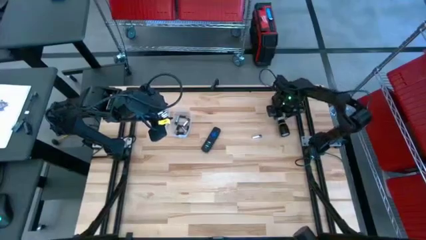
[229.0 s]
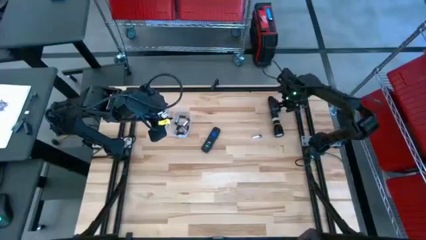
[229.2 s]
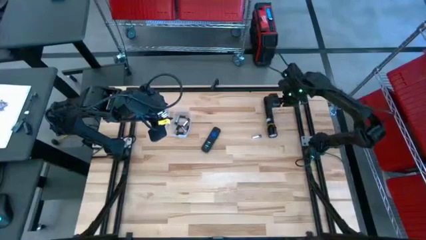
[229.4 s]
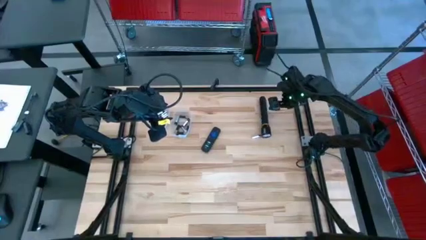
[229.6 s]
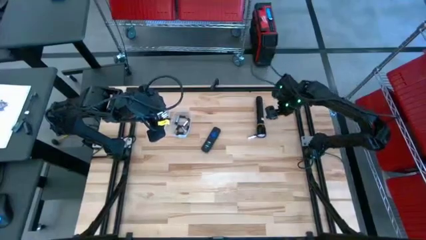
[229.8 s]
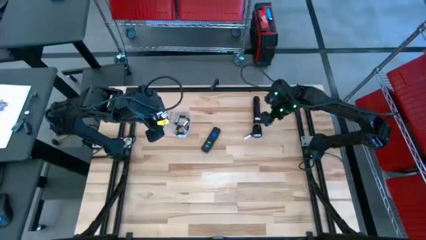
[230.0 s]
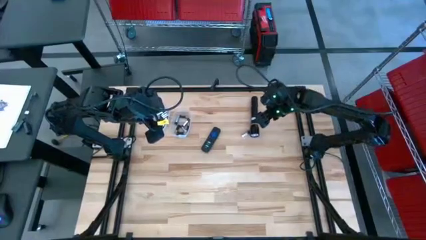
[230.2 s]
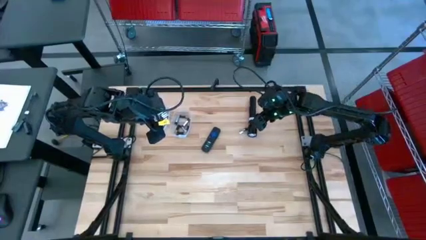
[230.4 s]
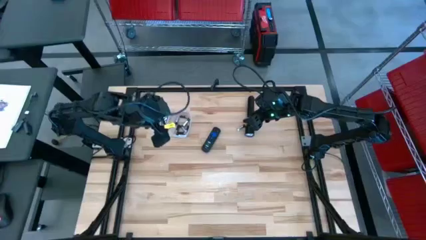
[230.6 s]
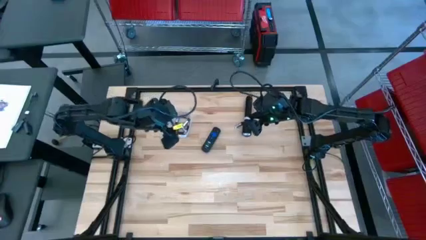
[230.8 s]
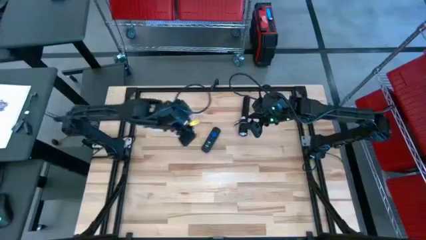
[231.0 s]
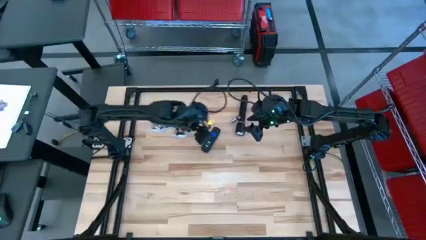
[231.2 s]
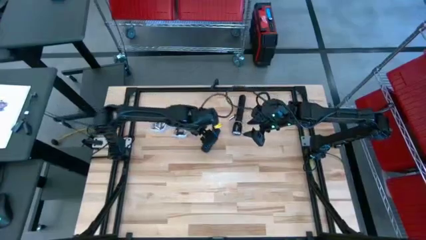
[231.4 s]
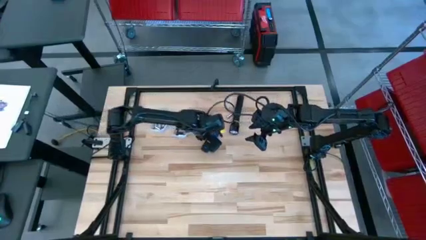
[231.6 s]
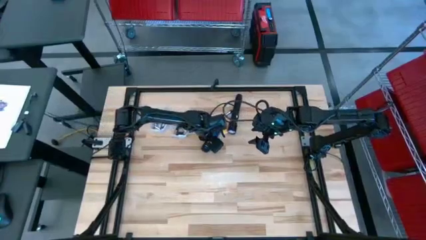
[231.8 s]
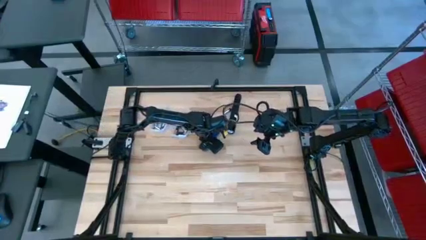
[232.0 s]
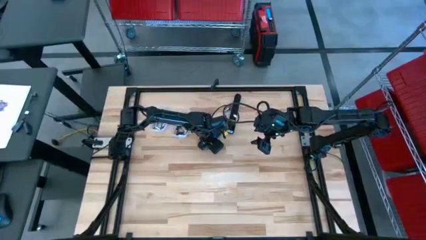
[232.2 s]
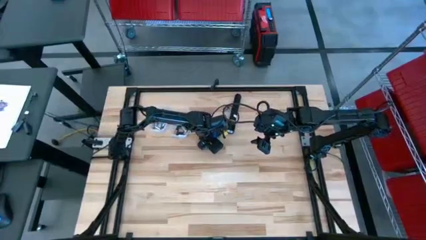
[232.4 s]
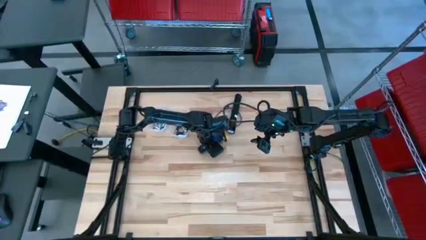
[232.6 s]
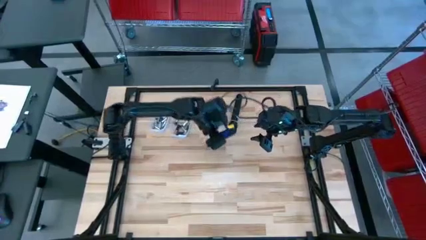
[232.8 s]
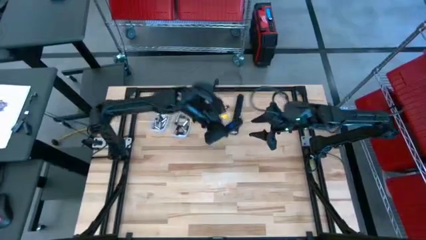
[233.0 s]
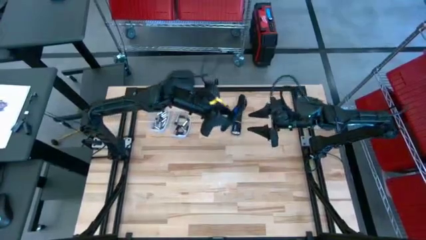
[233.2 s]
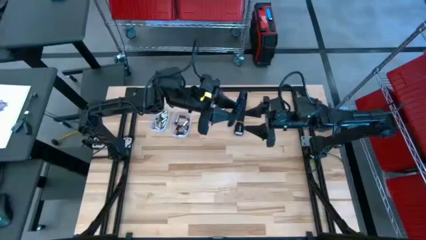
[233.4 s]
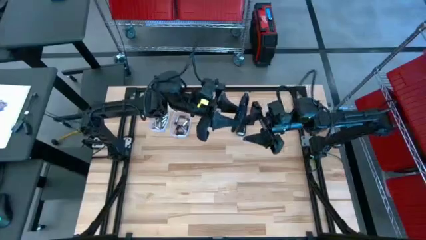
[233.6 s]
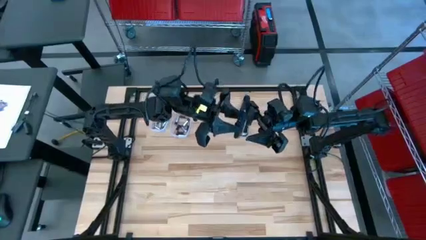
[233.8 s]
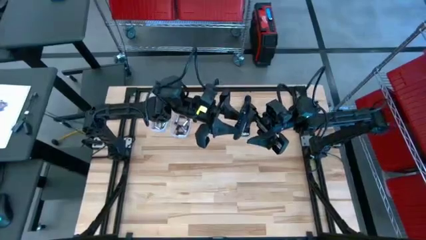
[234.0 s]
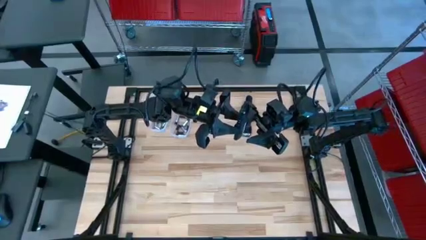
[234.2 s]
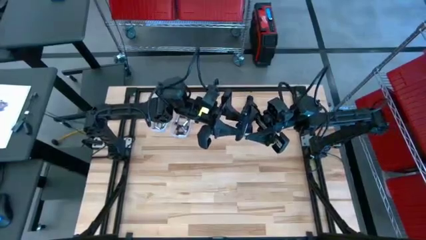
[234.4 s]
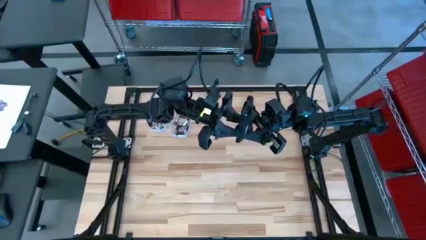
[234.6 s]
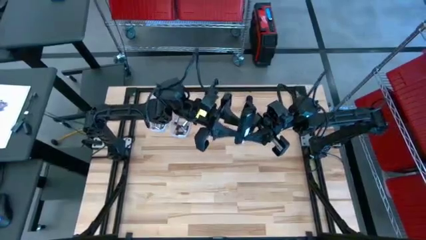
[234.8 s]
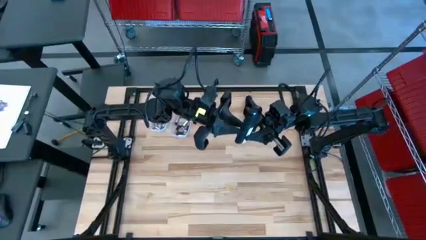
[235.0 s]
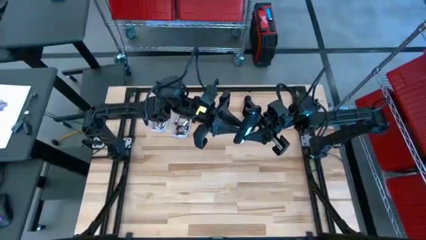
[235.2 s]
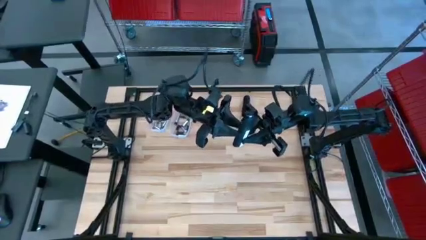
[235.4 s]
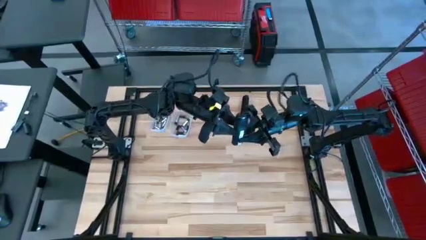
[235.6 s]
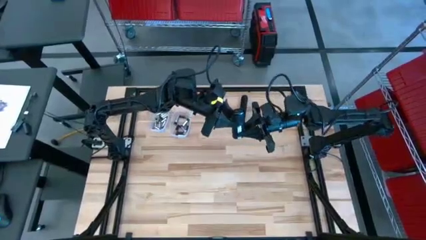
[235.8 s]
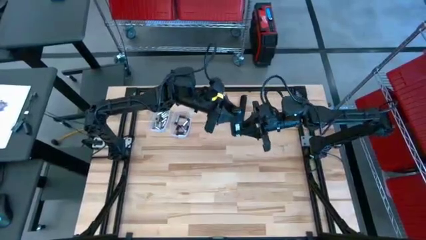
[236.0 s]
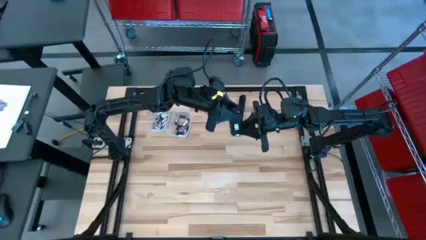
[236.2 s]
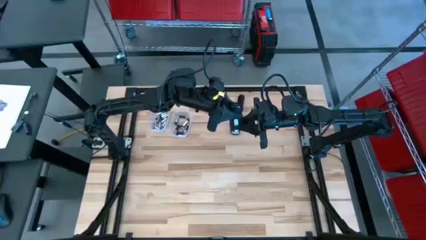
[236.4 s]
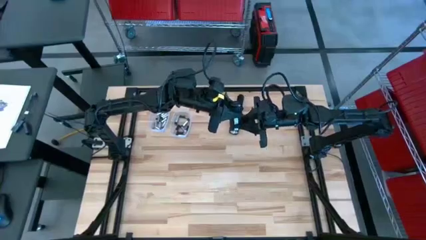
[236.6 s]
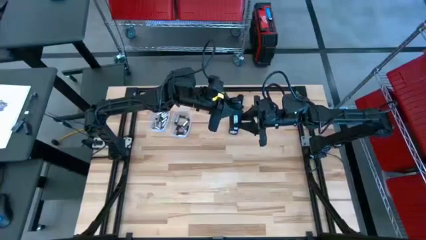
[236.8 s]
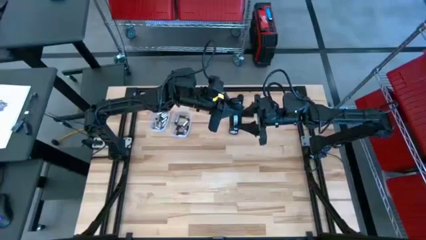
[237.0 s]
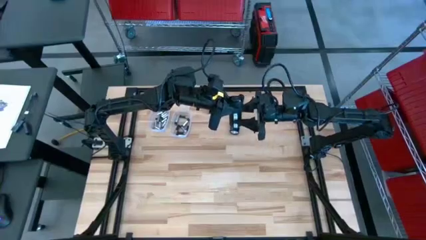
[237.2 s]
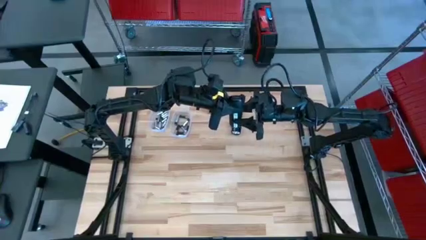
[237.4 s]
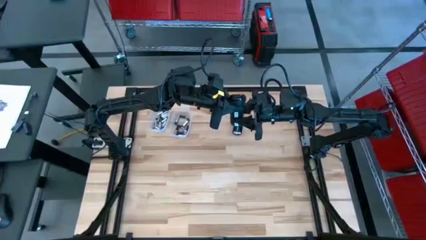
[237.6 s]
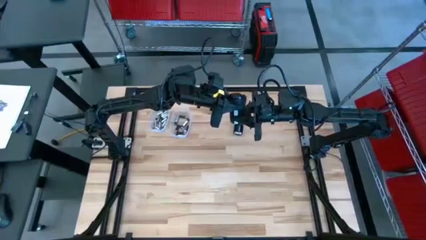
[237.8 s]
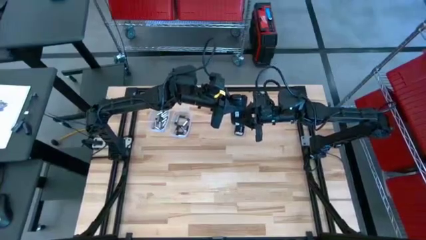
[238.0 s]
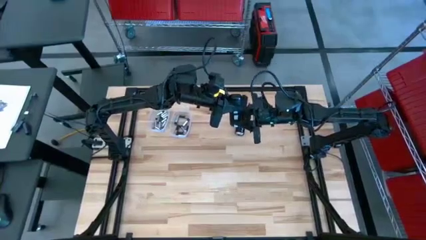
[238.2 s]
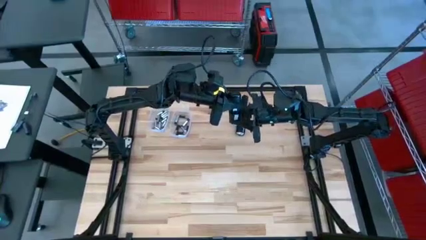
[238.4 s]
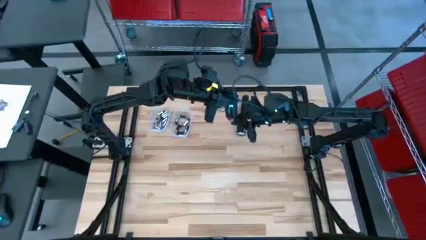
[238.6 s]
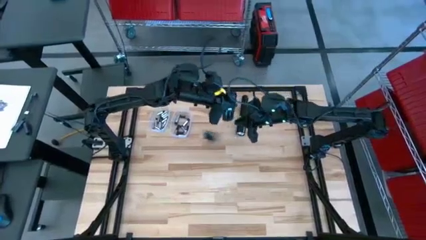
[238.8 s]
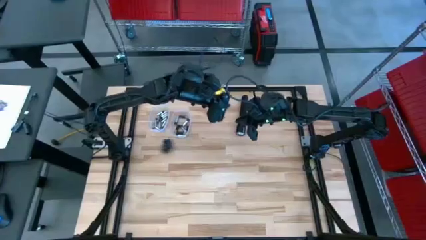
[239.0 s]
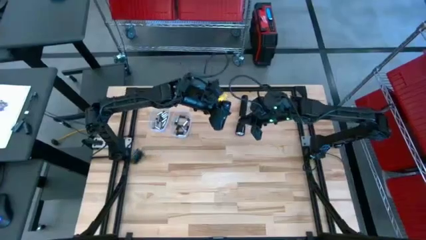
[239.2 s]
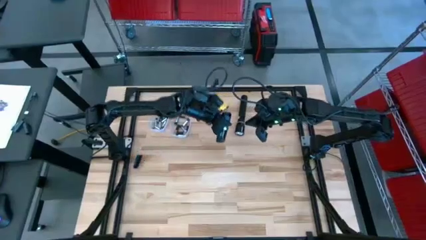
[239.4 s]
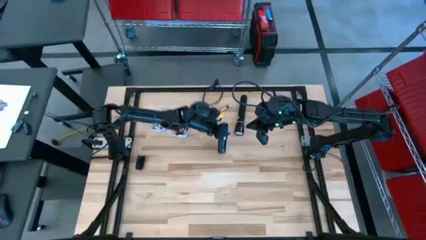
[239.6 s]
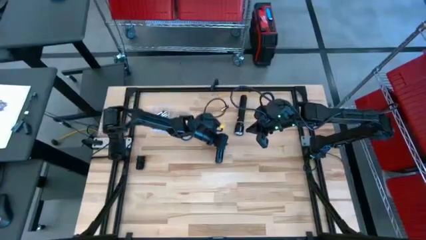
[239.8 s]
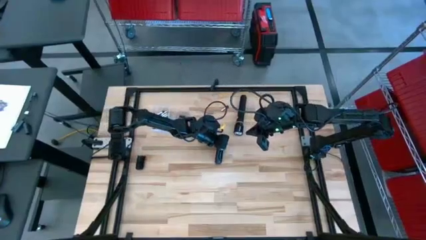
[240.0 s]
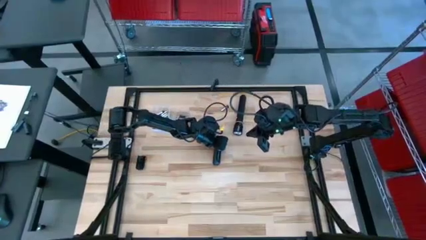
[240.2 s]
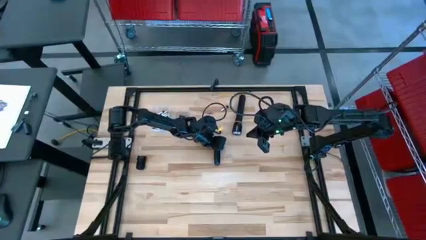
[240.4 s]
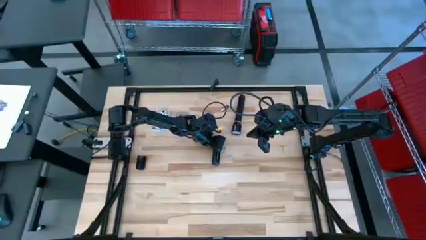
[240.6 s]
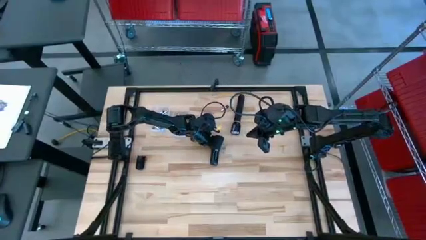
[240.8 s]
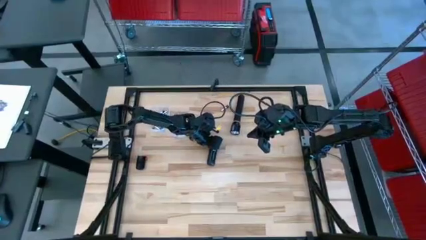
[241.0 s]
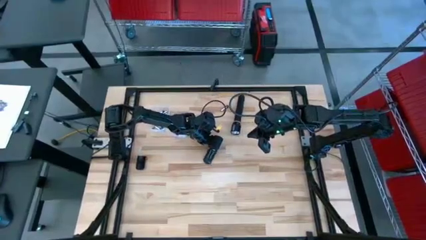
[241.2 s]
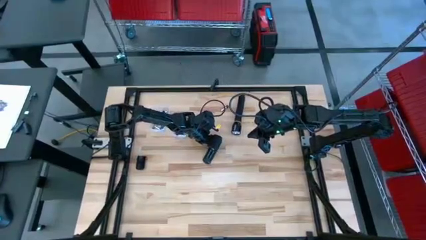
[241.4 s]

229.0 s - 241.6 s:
Task: Insert battery
Open the remote control battery compartment

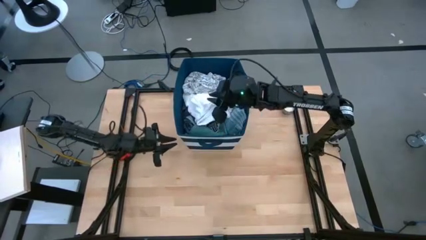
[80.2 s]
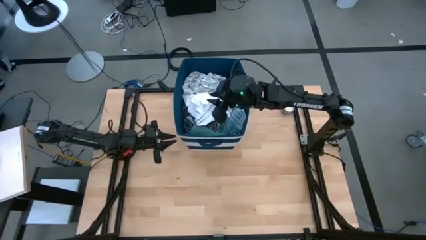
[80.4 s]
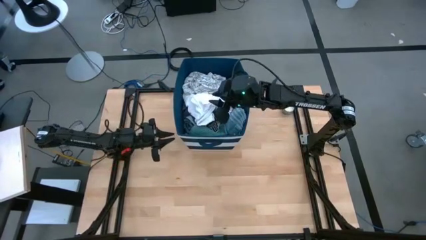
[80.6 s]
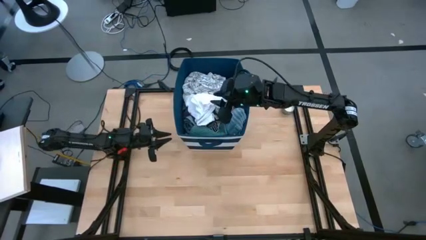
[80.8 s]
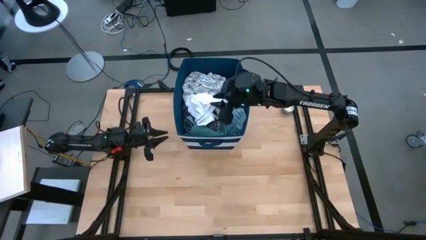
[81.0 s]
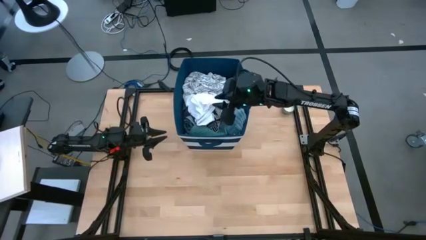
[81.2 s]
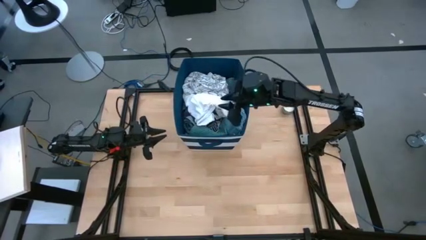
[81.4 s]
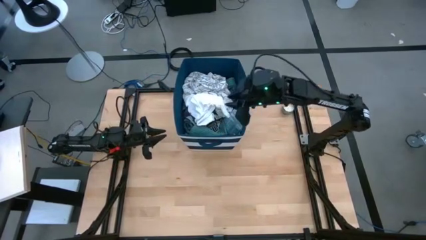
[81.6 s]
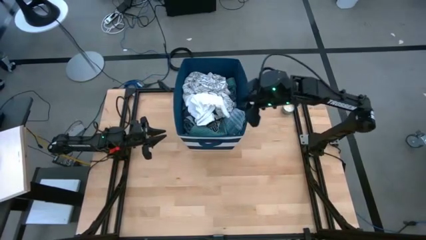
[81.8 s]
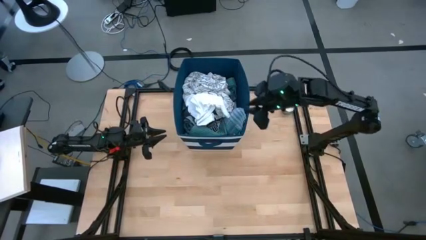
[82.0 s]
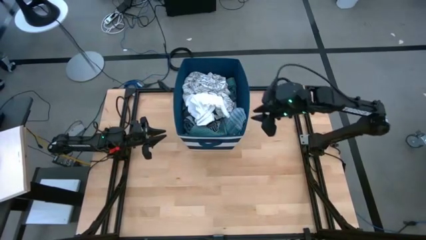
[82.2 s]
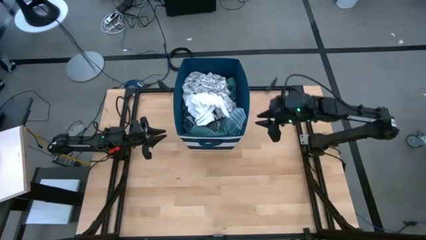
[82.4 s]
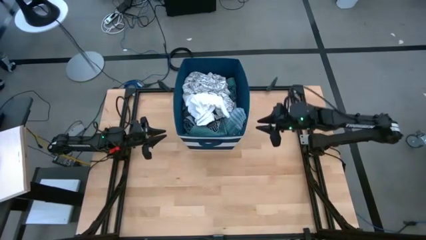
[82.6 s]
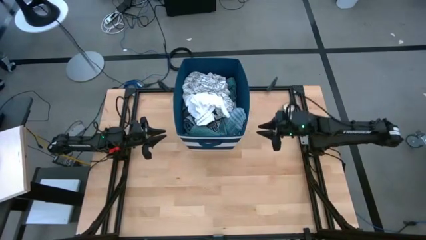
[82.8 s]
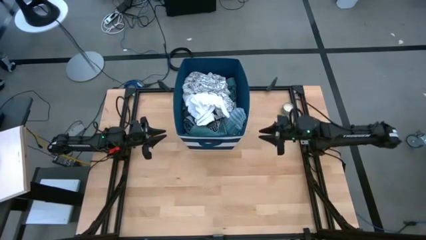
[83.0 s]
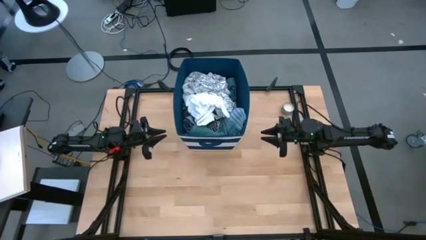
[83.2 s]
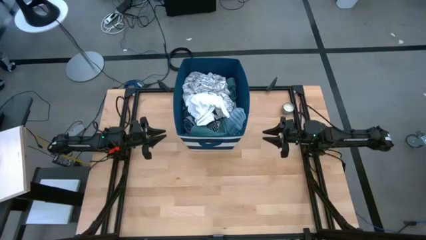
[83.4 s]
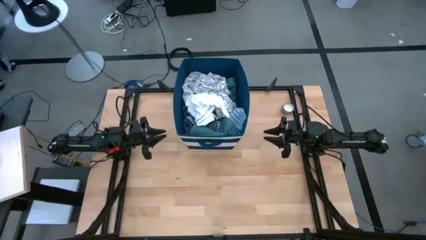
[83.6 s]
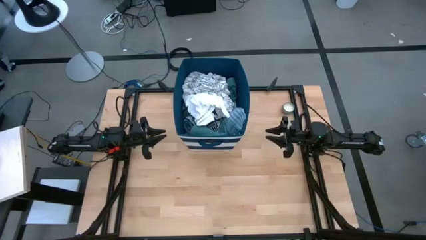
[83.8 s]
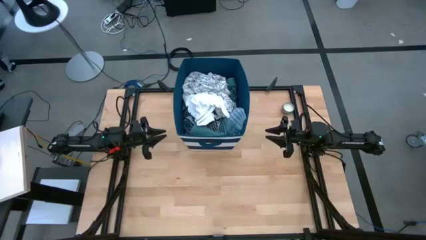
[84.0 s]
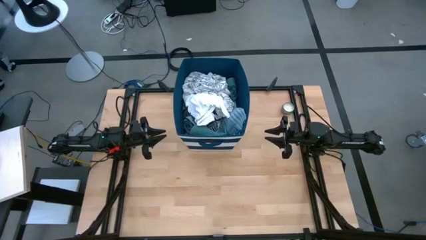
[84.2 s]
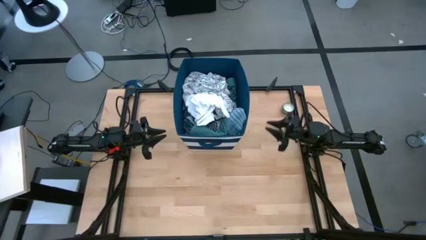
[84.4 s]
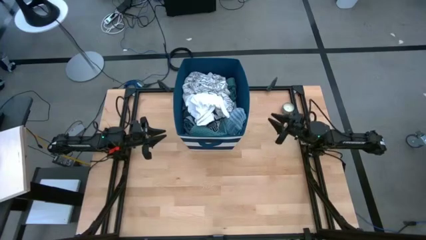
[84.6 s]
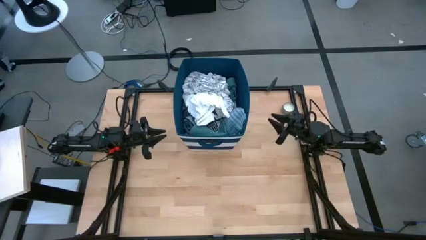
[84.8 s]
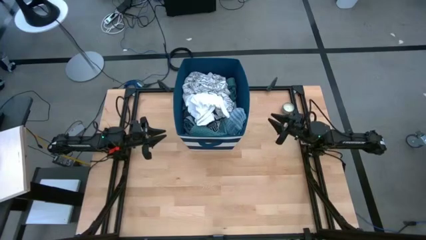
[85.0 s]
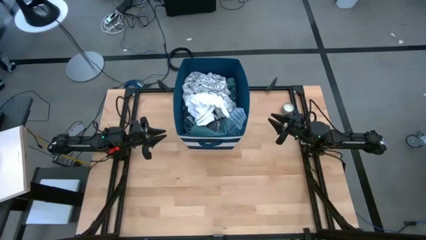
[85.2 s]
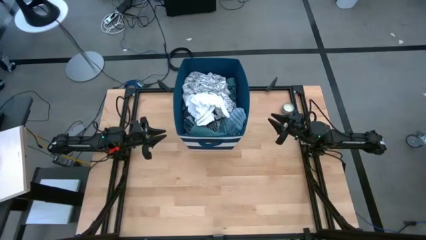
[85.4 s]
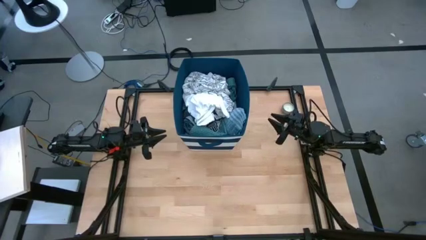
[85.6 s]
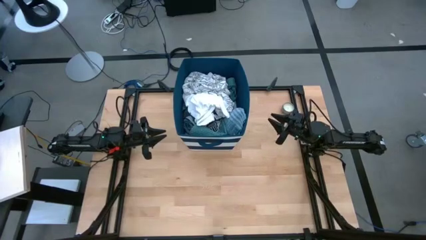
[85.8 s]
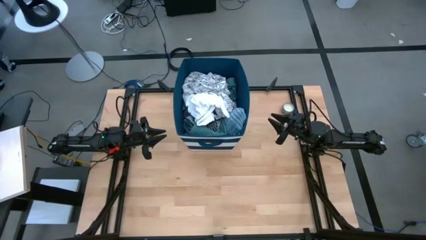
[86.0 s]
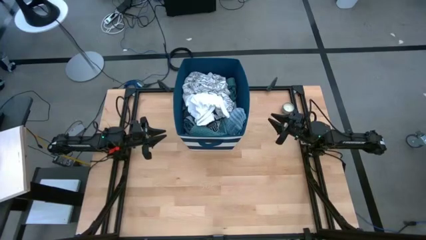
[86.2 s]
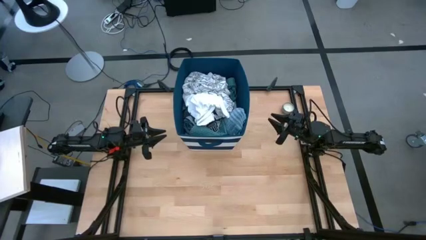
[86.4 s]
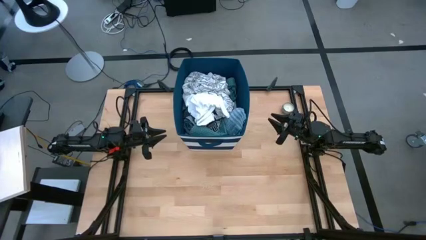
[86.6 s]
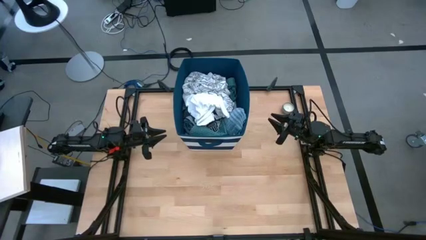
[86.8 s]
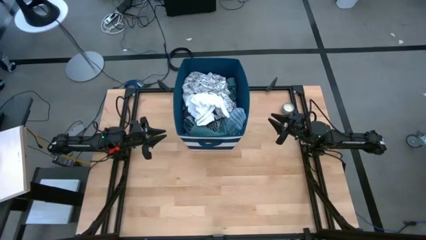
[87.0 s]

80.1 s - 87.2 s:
Task: Sort clothes
Return to Home Position
